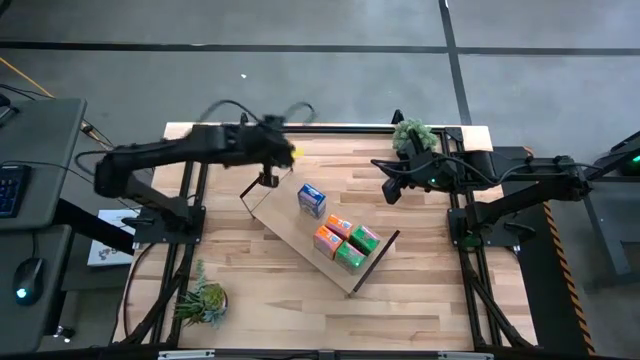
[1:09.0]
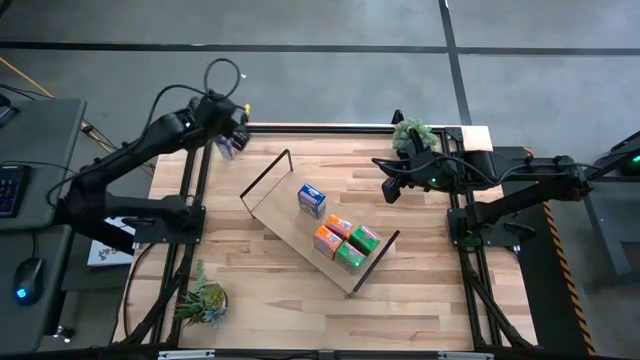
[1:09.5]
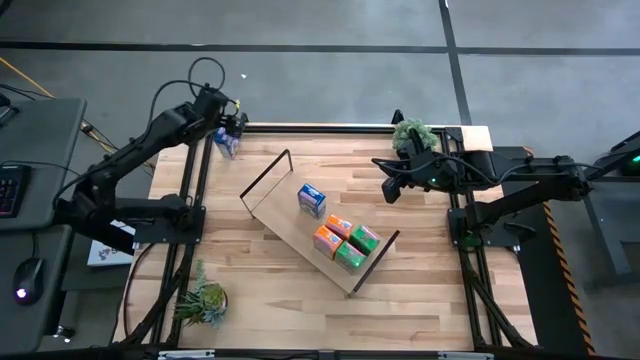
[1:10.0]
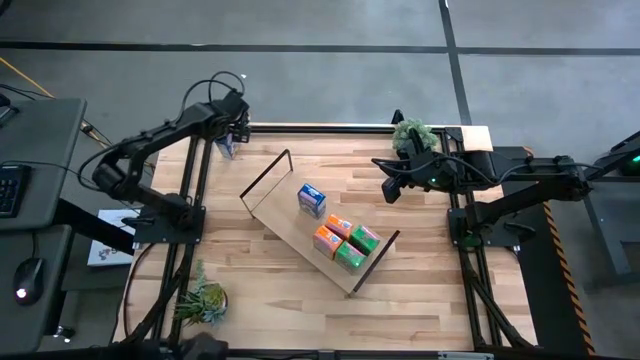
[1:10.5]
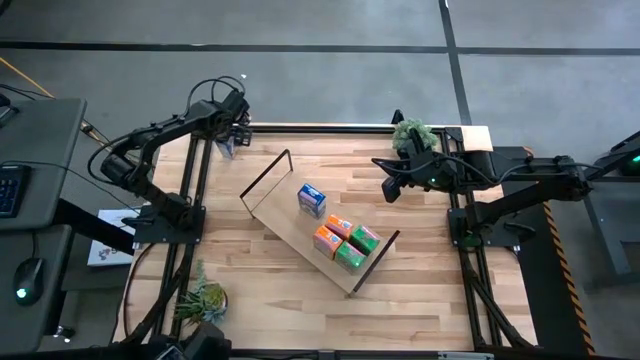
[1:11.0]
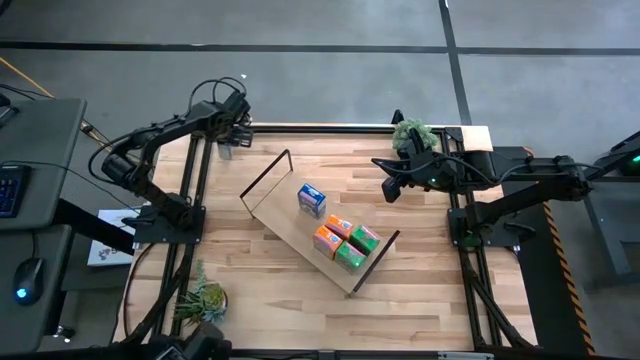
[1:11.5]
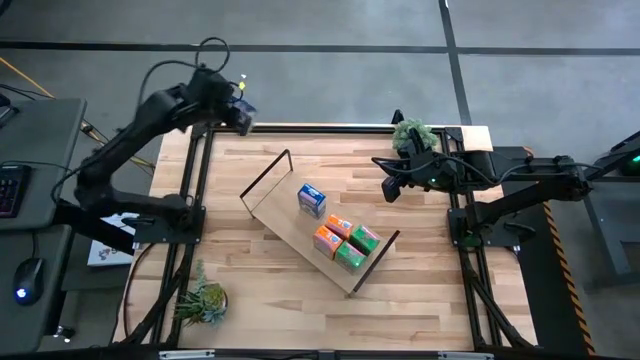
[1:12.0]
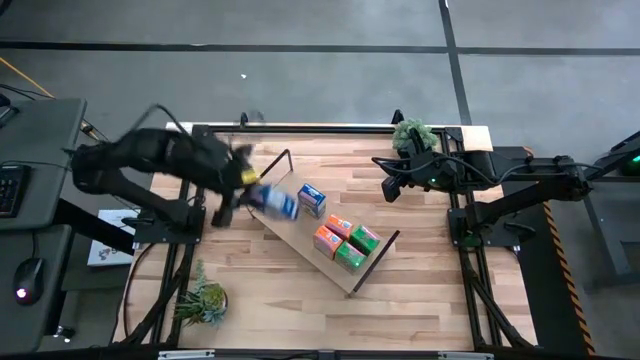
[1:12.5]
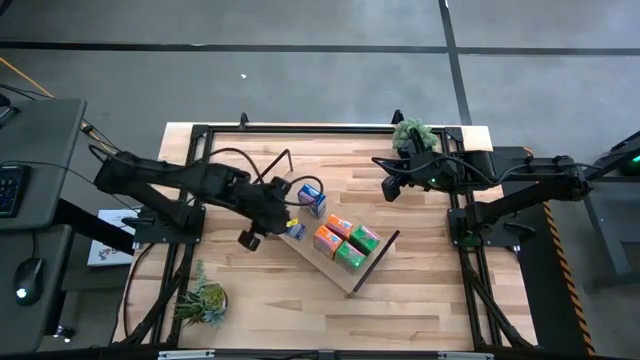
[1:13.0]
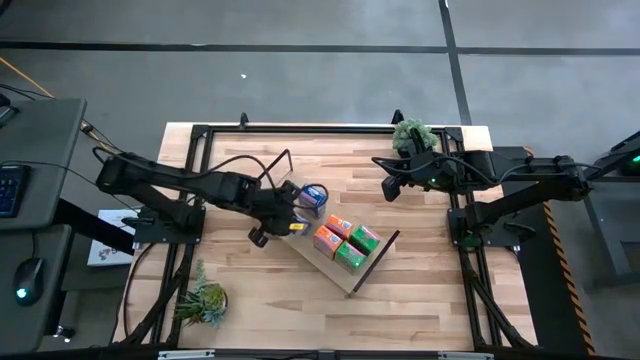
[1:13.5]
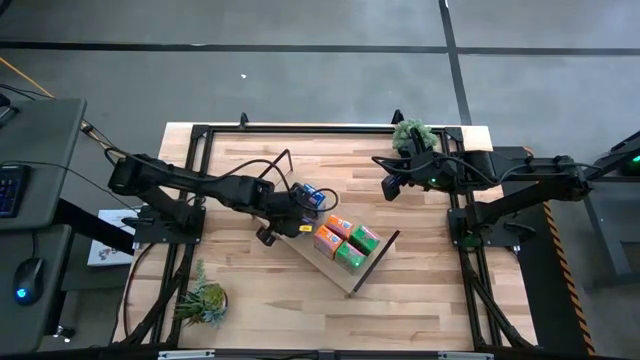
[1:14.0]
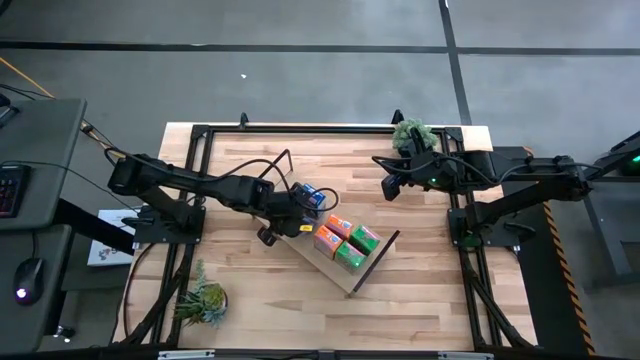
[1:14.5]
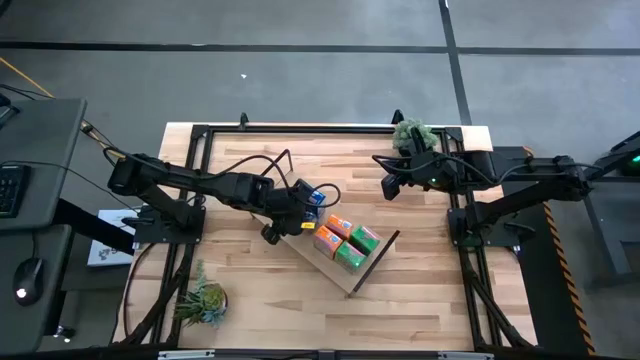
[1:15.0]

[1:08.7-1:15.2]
Task: Stack cereal on shelf
Put the blue cereal box on the shelf aligned with the blue cereal box

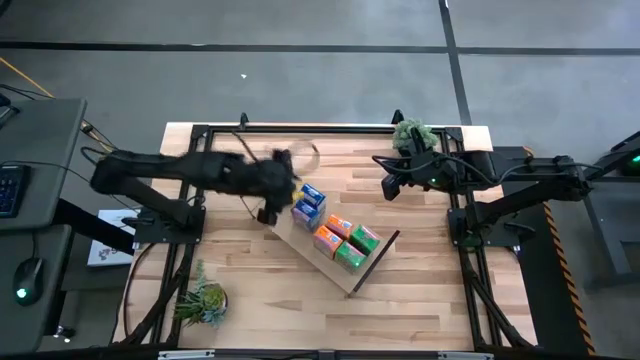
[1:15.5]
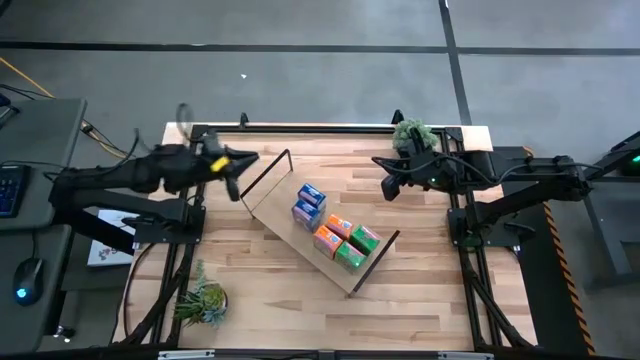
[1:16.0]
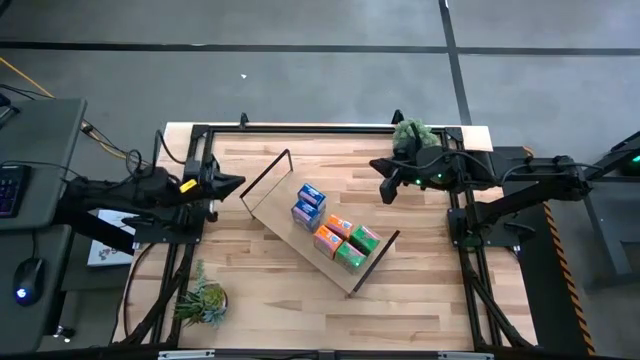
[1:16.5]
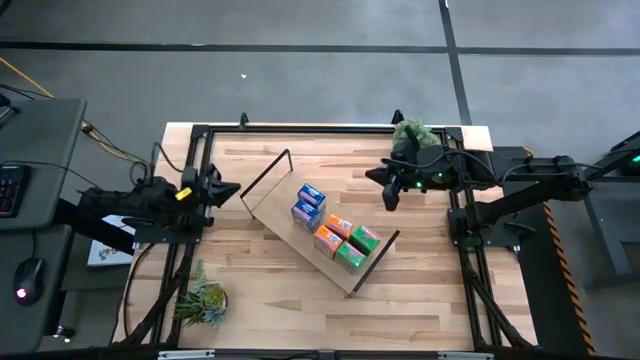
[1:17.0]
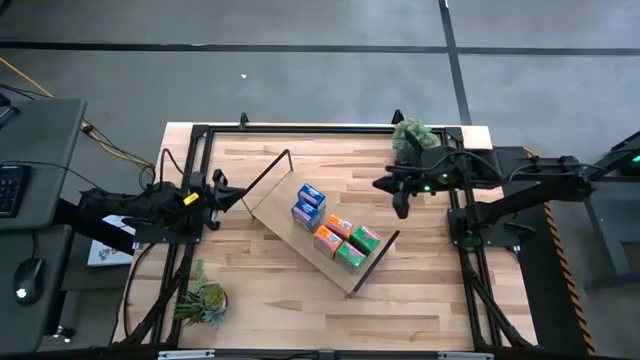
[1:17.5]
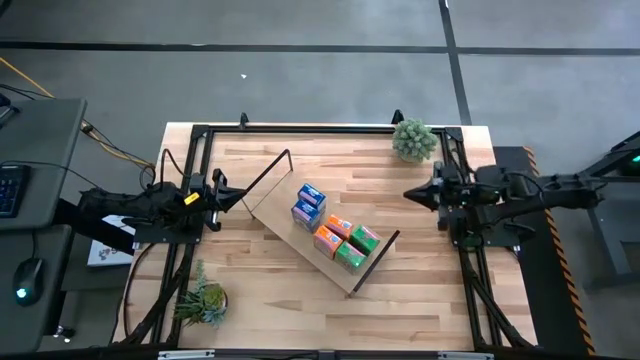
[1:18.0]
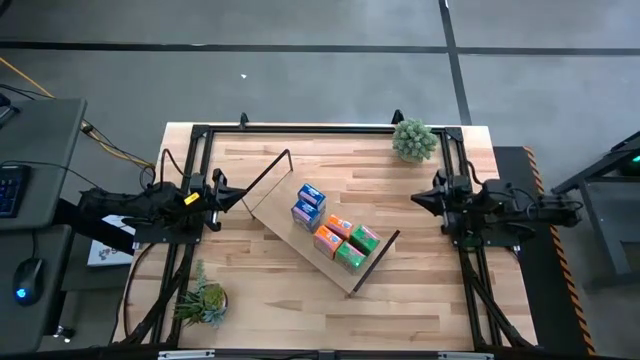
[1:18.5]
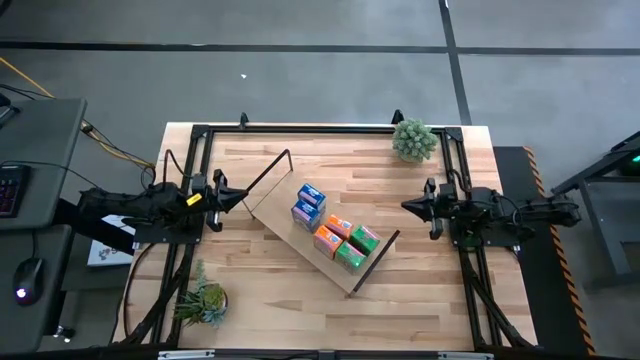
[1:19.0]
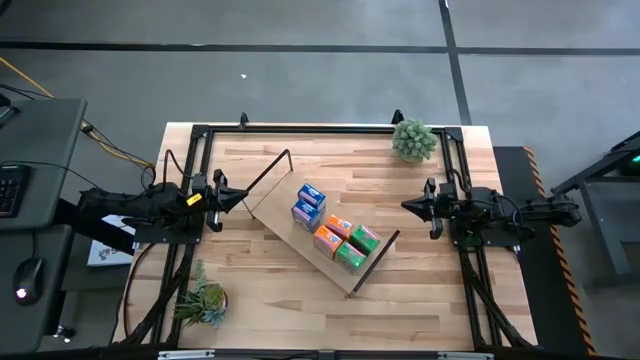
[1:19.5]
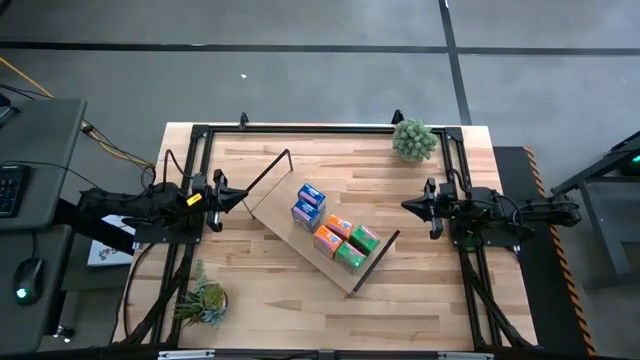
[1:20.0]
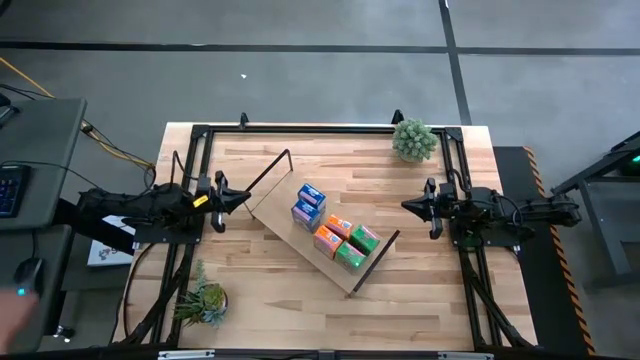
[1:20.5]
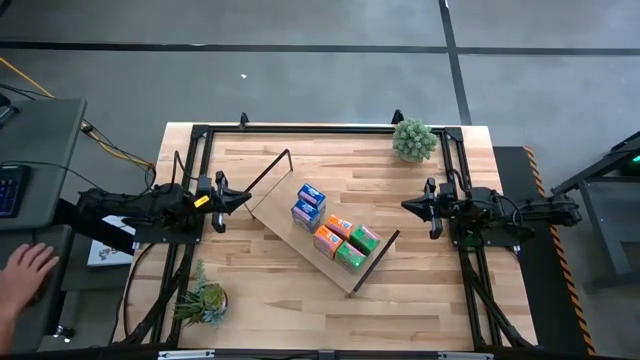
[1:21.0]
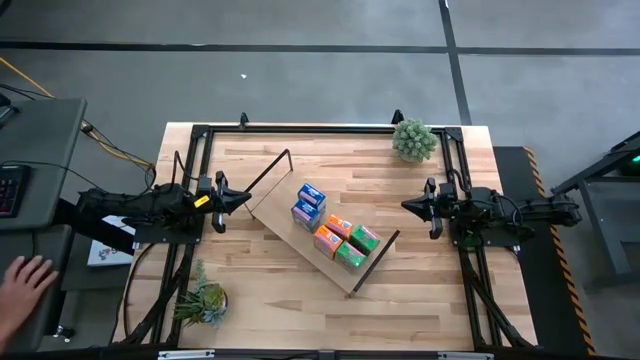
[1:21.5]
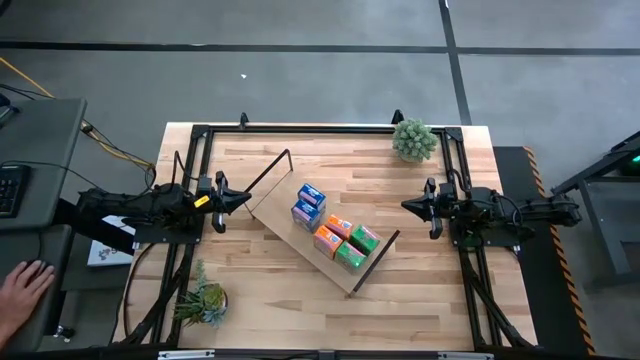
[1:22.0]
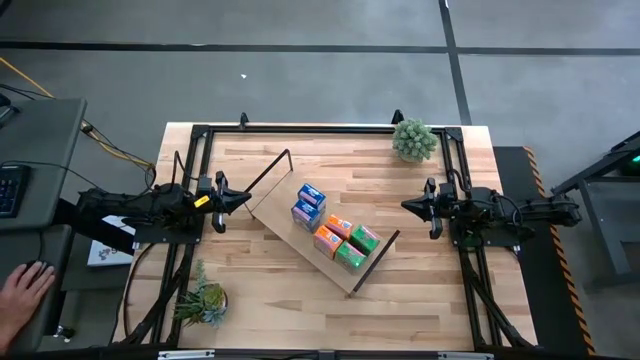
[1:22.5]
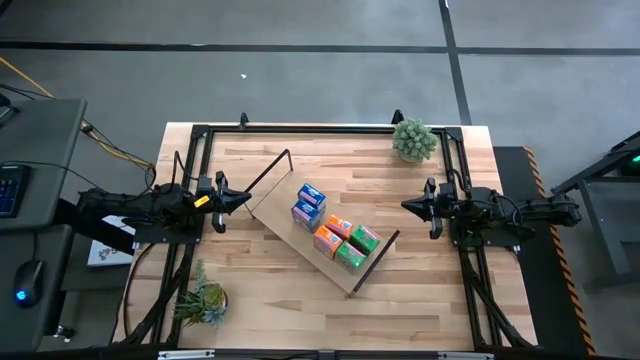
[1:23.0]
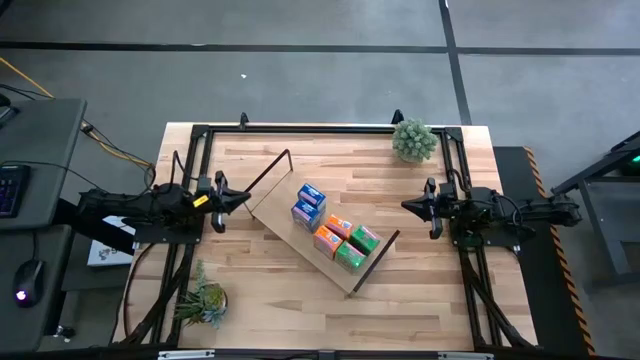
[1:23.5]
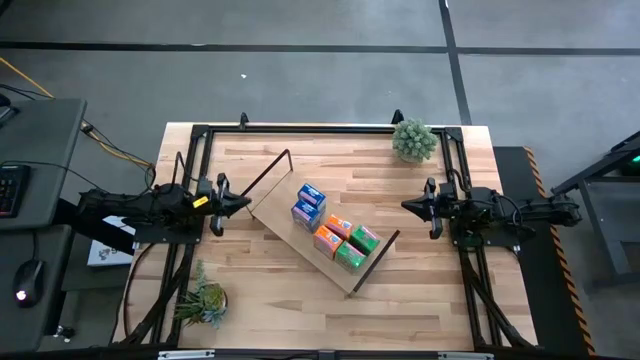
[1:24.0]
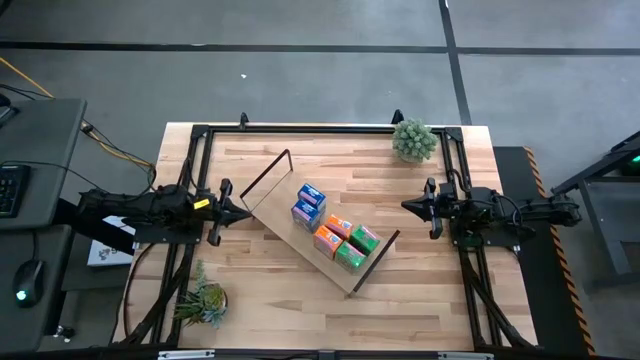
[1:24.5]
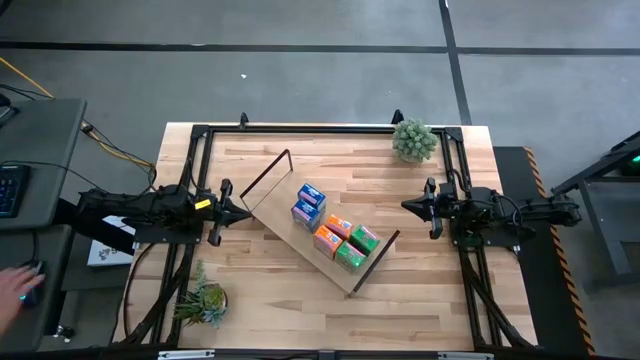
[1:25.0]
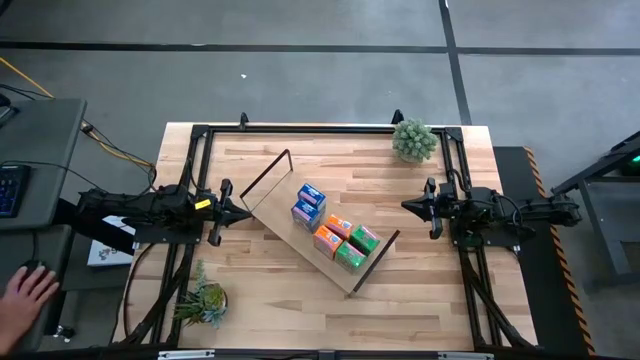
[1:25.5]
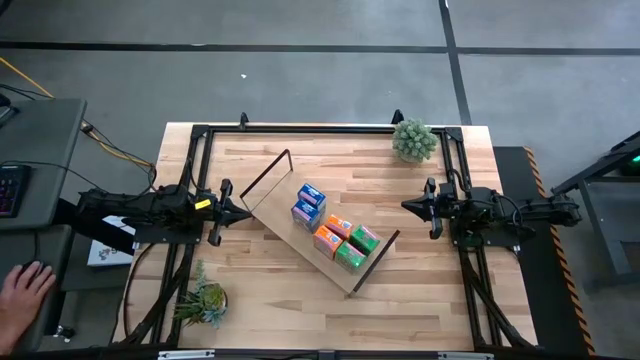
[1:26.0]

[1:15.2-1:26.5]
Return to Home Position

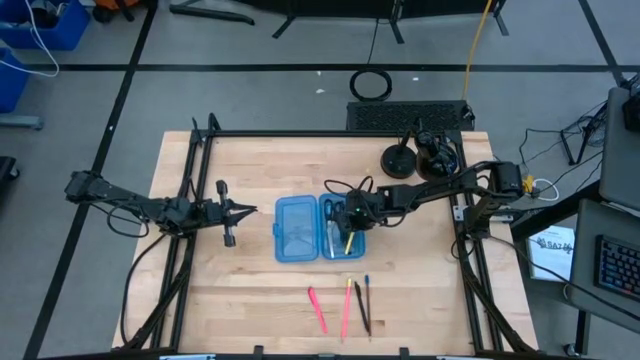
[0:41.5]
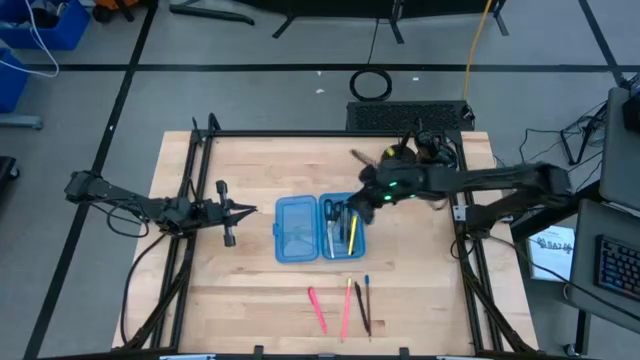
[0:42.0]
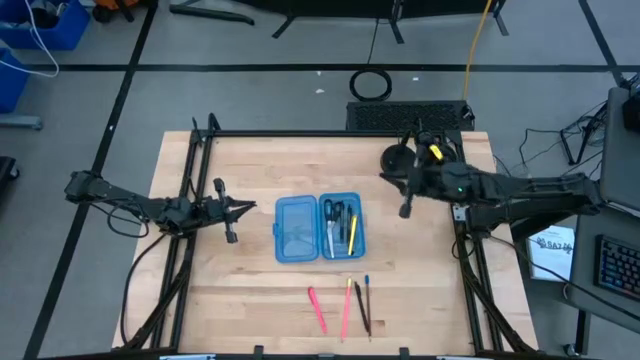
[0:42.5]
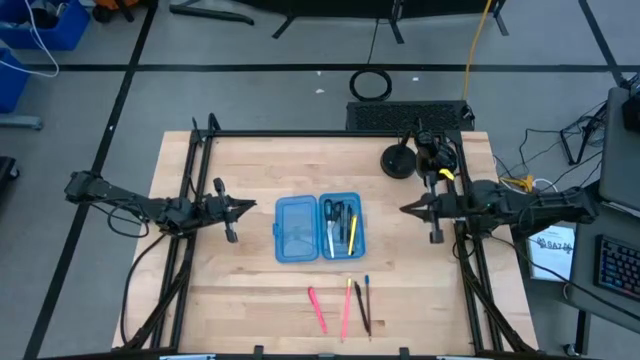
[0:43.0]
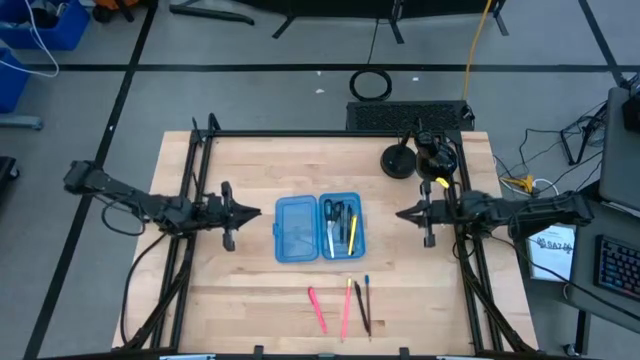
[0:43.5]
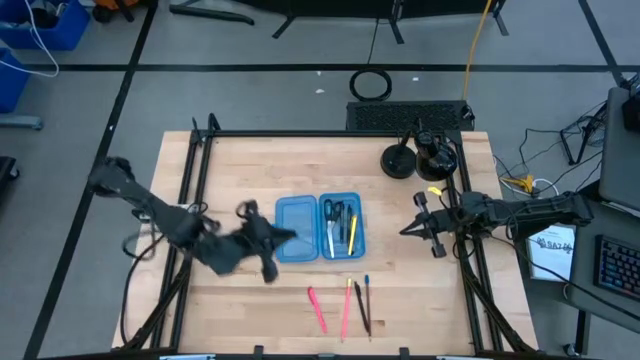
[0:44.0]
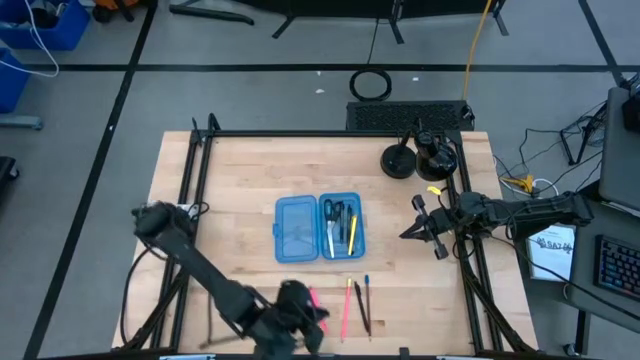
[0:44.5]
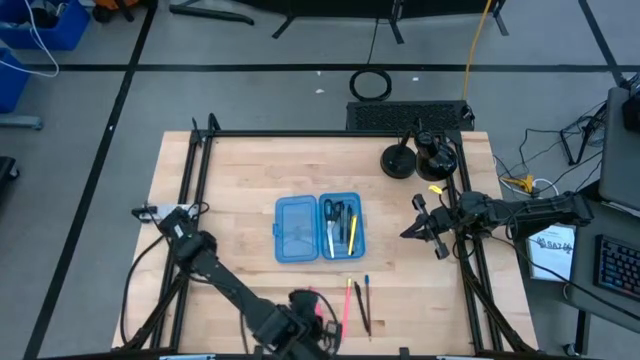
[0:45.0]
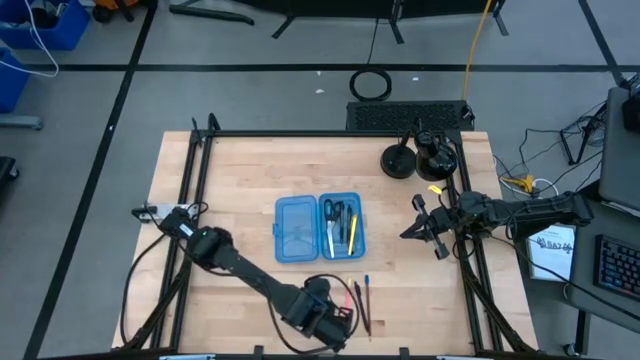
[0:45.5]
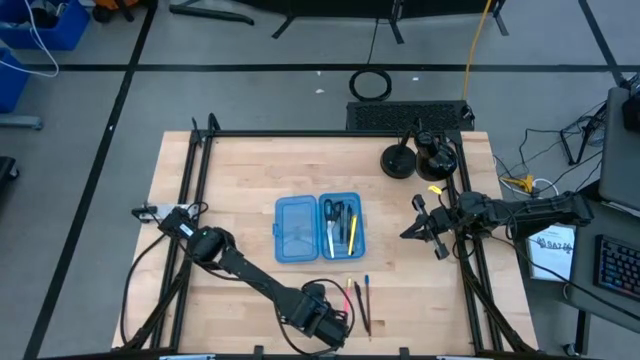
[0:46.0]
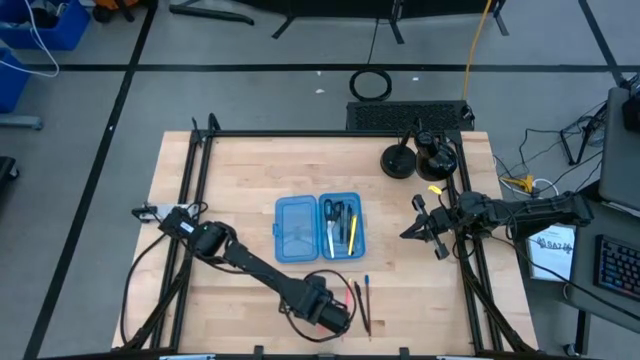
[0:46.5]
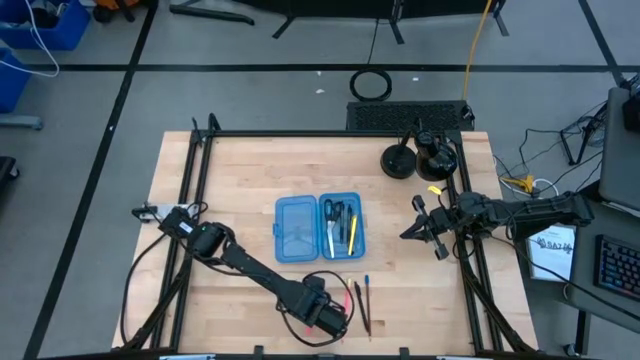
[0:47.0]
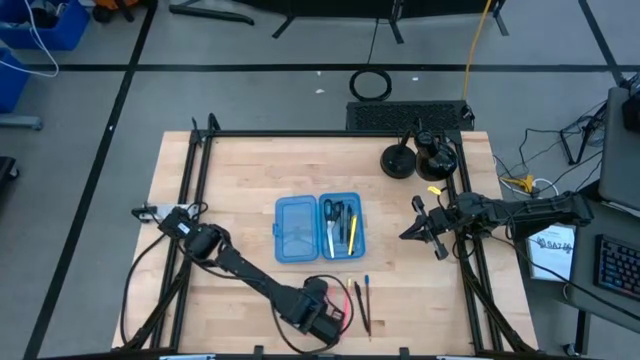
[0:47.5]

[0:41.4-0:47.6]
Task: Pick & place school supplies into a supply box
Put the pink pen into the blue supply box
